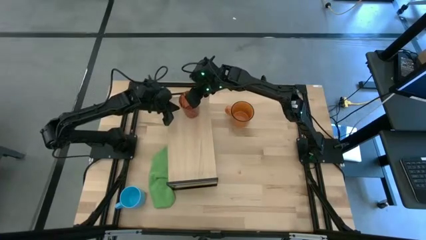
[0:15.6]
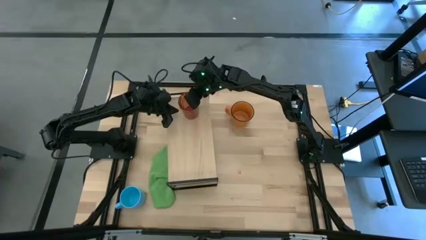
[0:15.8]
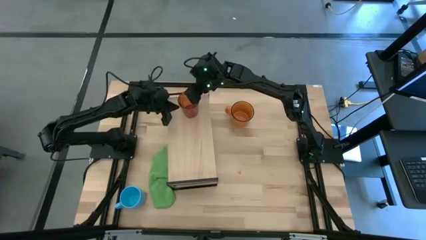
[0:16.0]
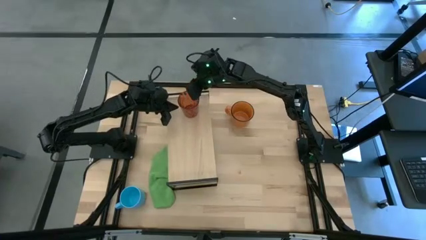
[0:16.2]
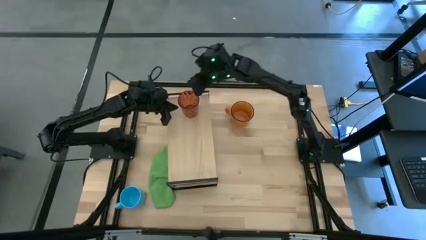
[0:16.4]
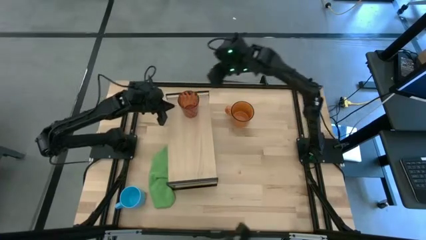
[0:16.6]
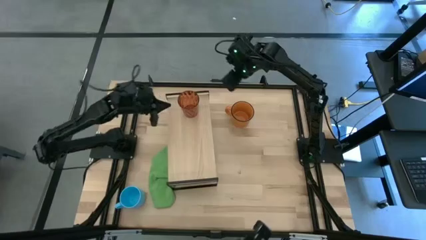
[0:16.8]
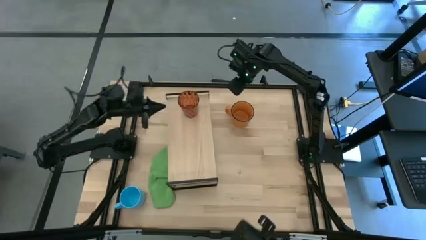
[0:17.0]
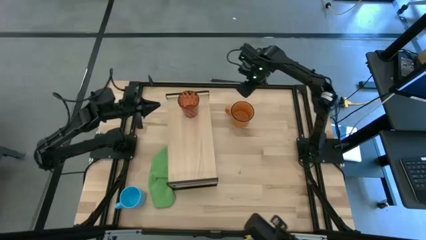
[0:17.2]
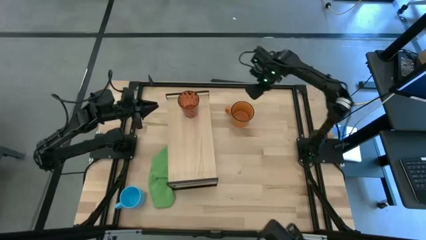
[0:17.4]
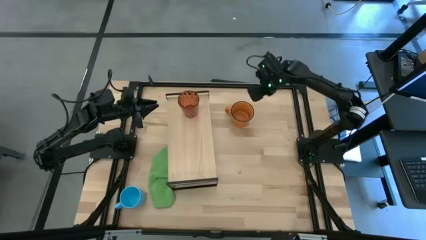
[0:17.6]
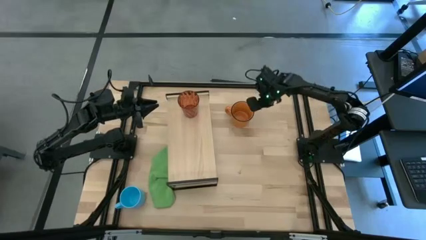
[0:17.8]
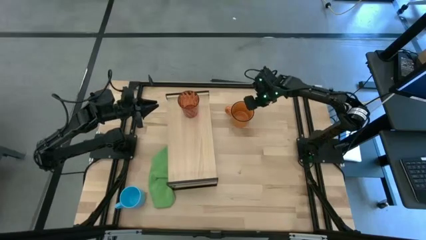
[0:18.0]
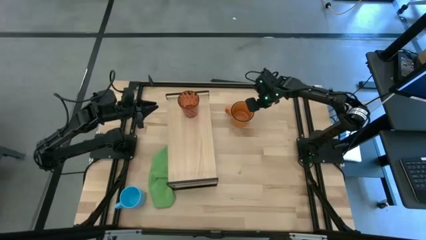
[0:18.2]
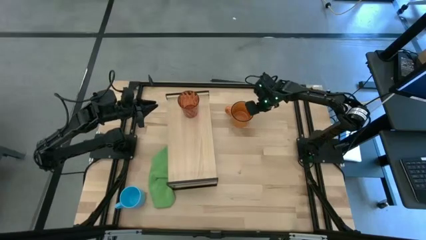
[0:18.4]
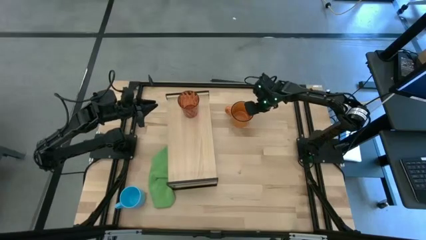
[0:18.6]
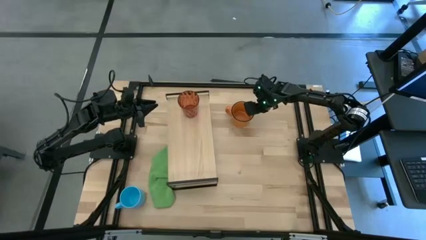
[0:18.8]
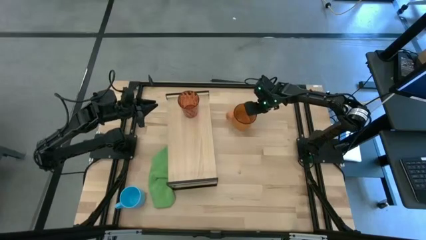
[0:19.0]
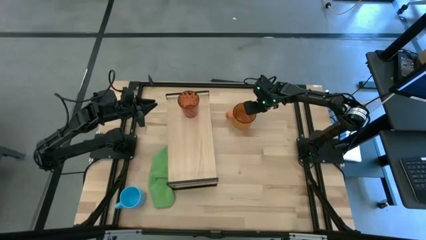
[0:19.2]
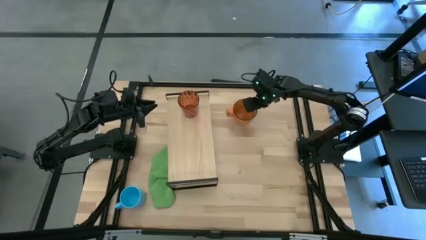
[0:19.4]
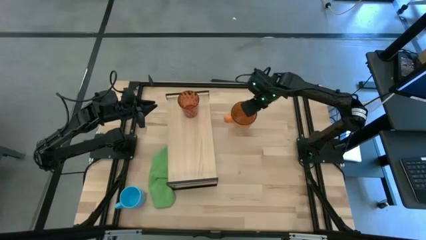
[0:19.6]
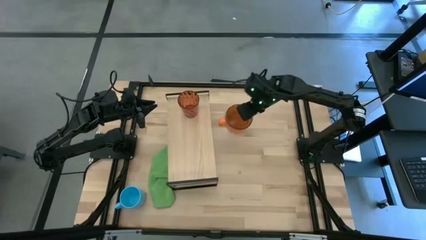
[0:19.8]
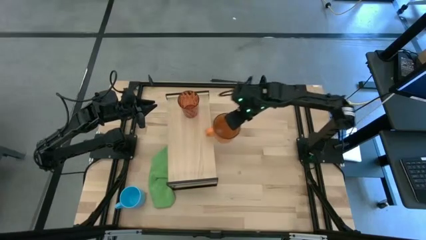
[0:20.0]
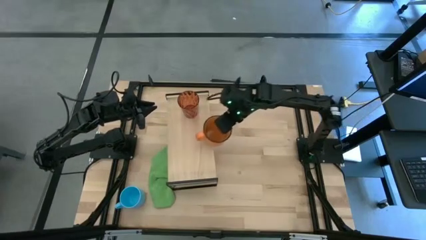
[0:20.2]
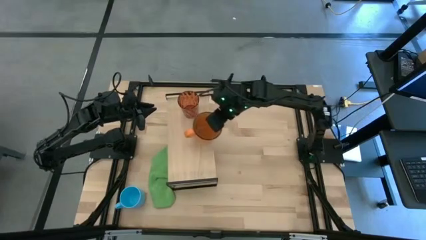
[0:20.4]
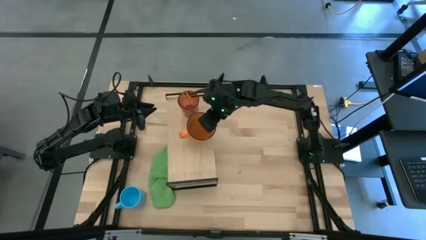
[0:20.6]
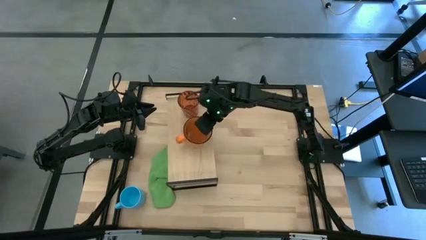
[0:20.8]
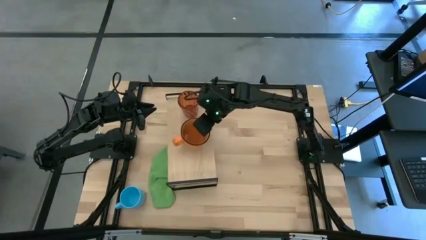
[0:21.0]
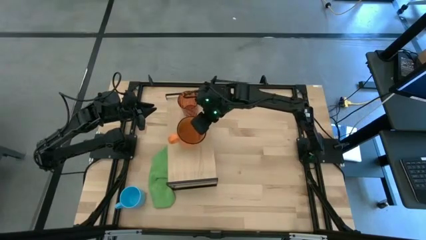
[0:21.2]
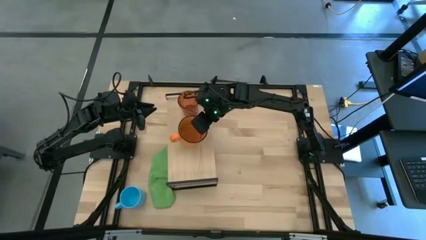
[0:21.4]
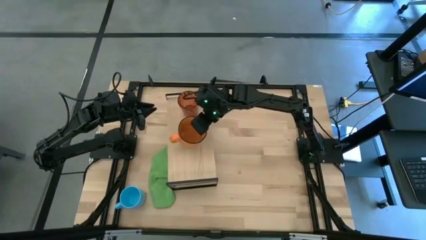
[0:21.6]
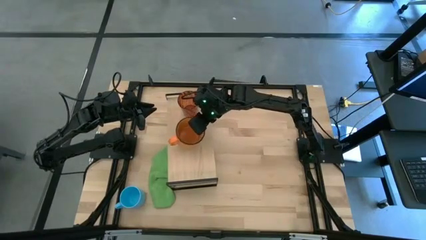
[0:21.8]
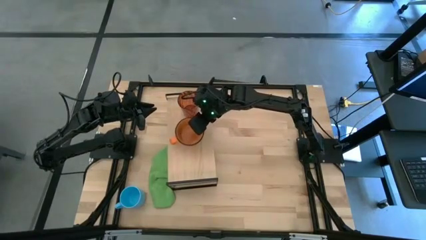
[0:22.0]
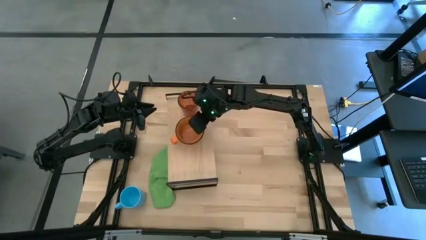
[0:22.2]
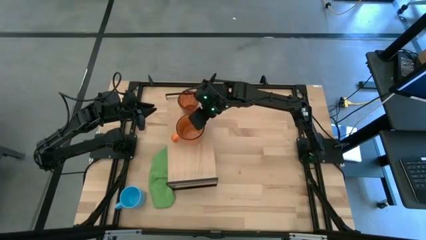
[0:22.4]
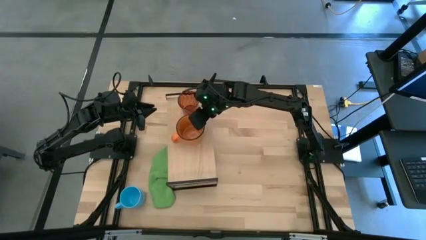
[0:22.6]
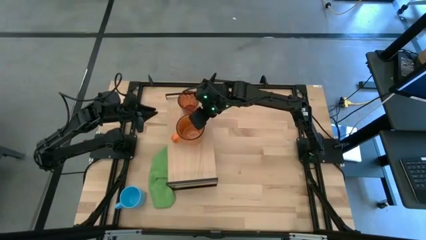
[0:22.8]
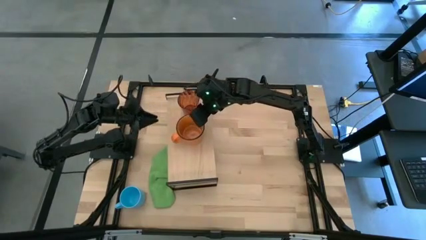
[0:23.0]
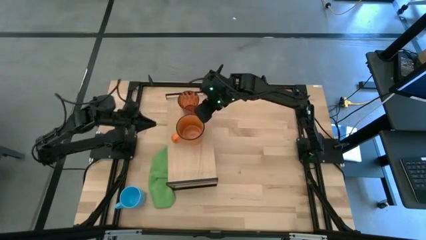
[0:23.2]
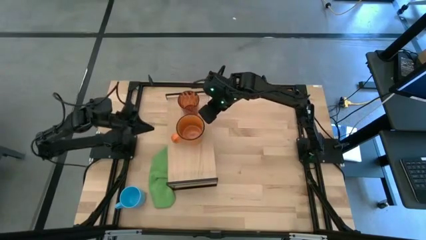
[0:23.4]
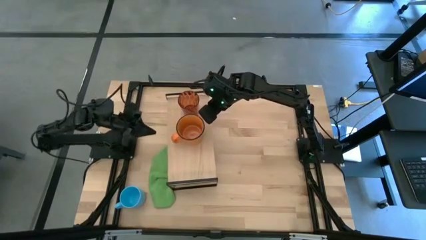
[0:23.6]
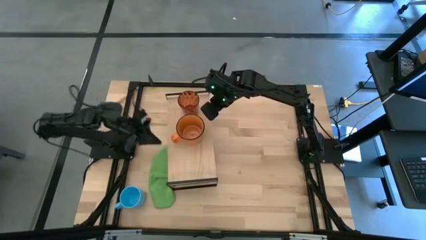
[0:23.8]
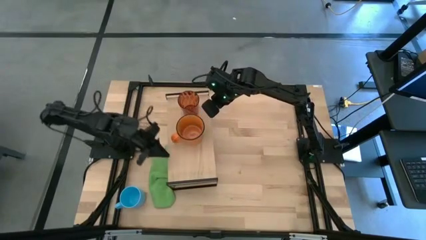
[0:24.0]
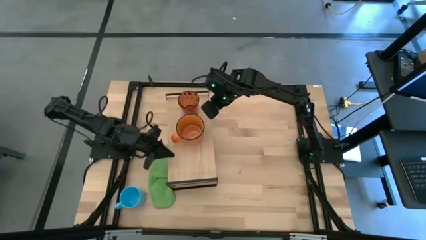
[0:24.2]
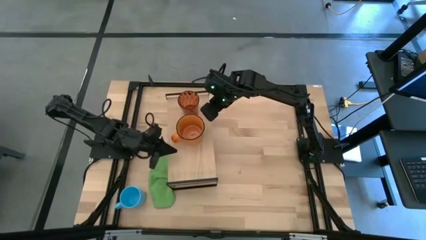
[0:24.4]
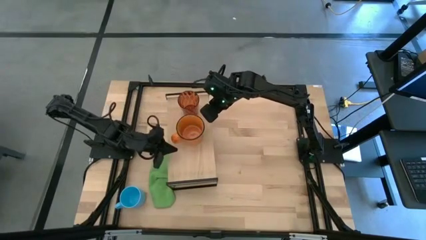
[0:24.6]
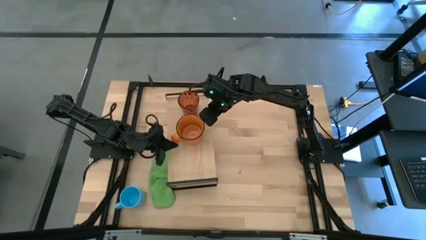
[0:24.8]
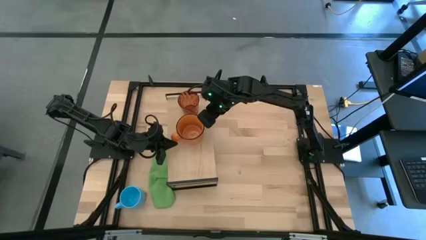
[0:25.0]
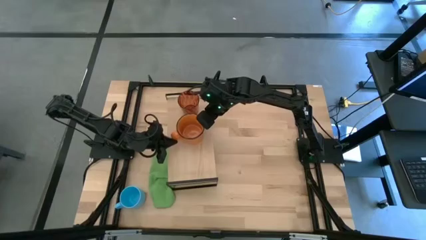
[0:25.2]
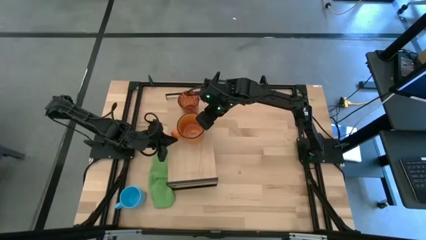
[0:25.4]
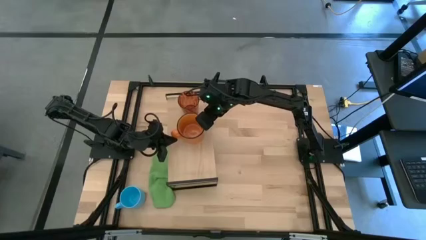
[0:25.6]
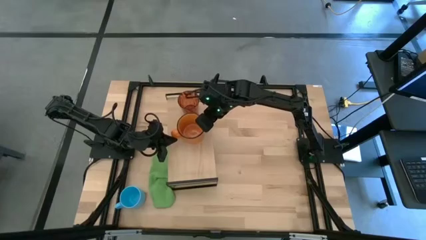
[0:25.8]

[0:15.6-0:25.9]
Task: Stack small to large cups/mugs on shelf
Put the orange mug on the shelf
